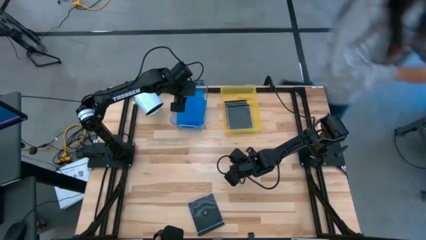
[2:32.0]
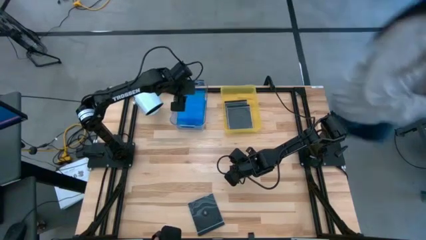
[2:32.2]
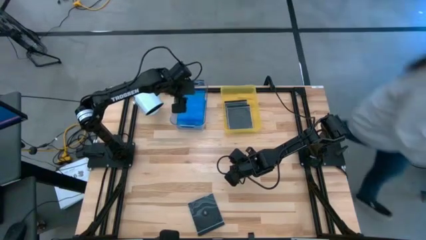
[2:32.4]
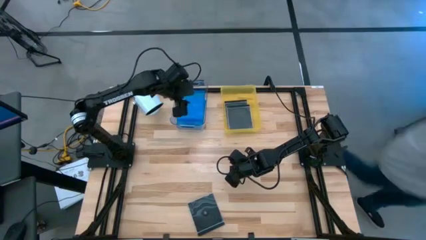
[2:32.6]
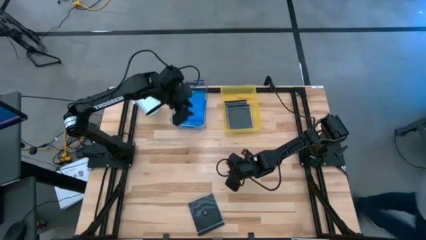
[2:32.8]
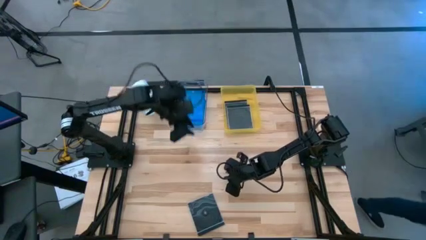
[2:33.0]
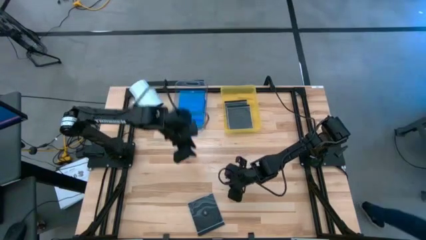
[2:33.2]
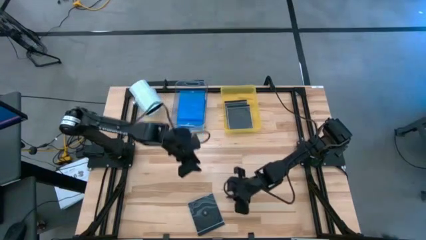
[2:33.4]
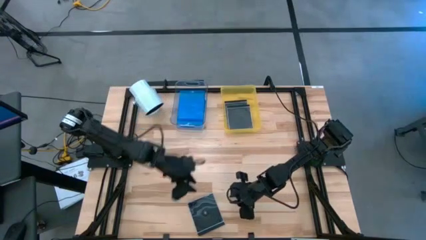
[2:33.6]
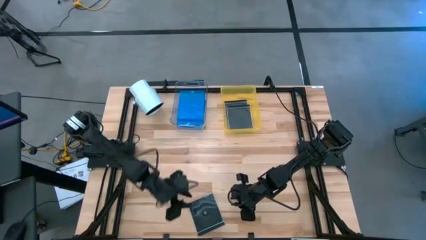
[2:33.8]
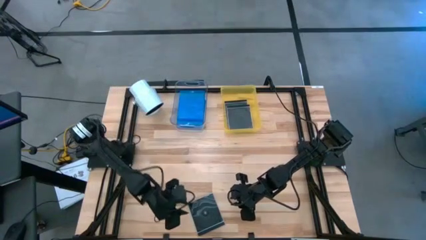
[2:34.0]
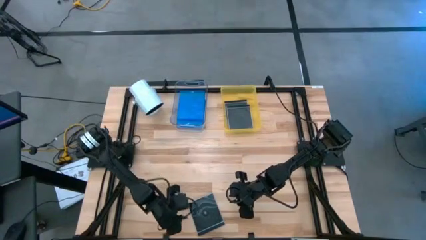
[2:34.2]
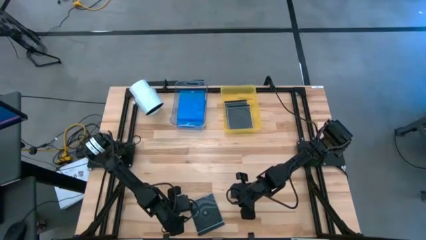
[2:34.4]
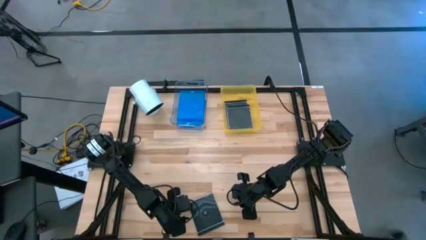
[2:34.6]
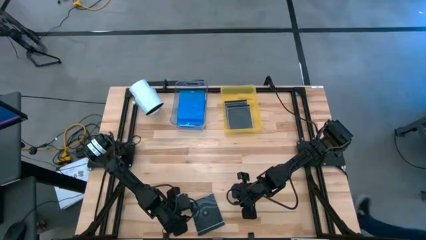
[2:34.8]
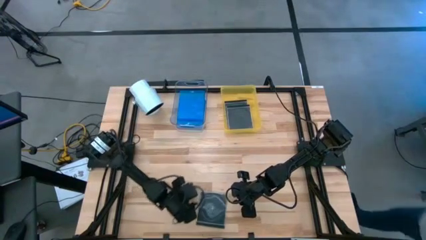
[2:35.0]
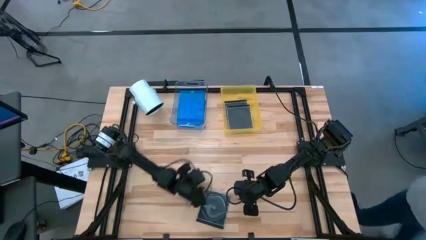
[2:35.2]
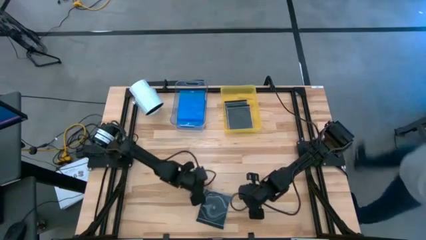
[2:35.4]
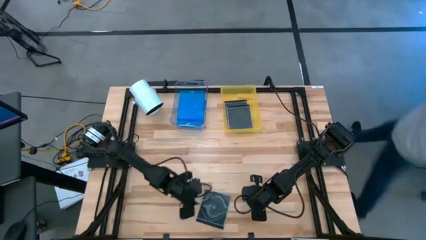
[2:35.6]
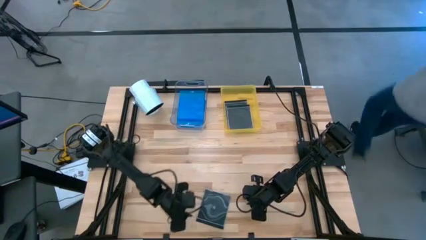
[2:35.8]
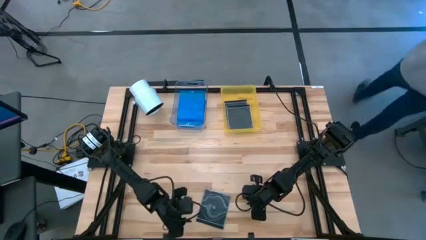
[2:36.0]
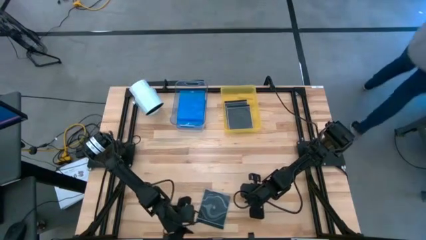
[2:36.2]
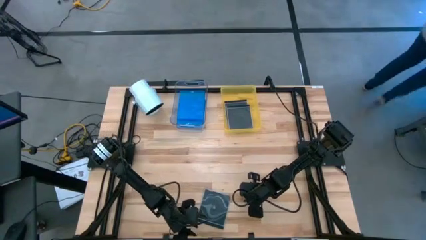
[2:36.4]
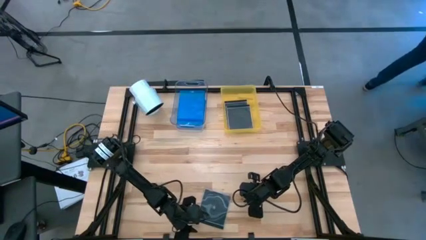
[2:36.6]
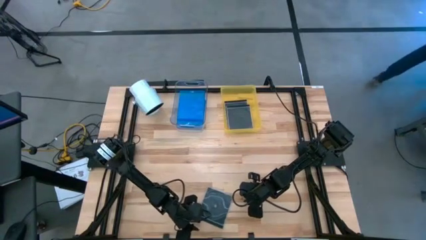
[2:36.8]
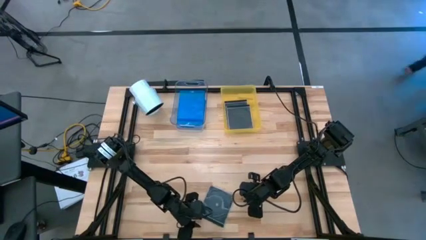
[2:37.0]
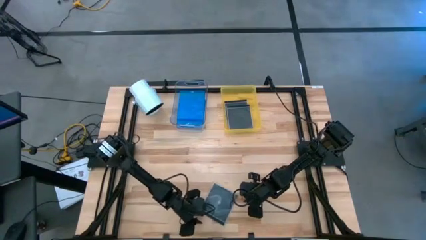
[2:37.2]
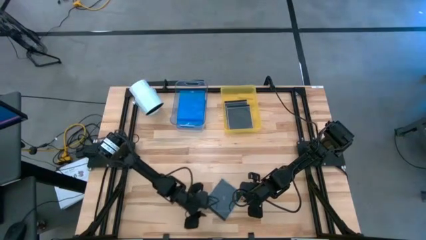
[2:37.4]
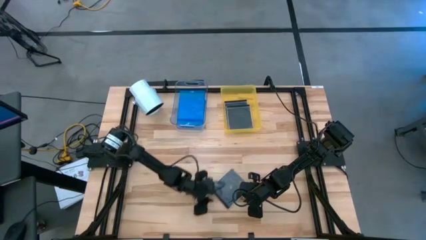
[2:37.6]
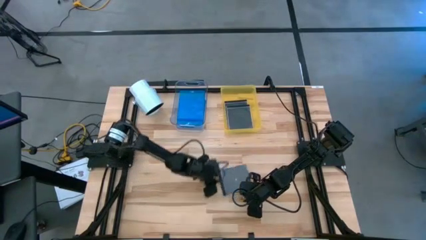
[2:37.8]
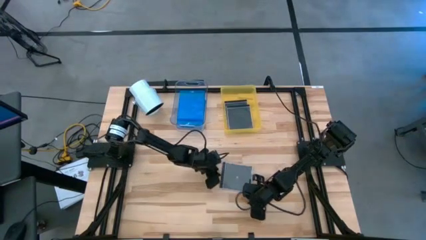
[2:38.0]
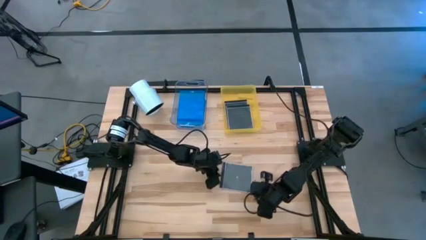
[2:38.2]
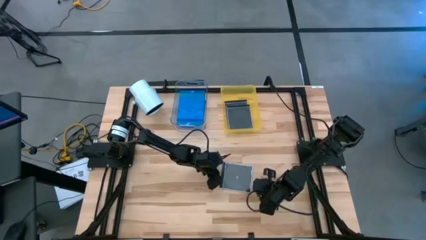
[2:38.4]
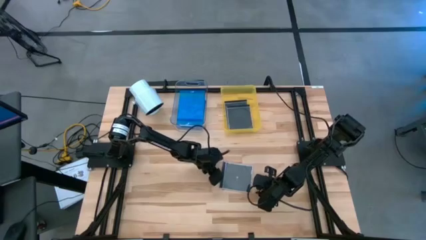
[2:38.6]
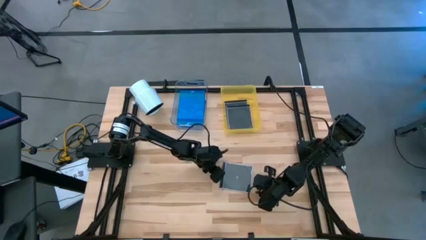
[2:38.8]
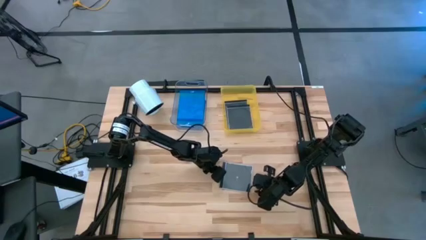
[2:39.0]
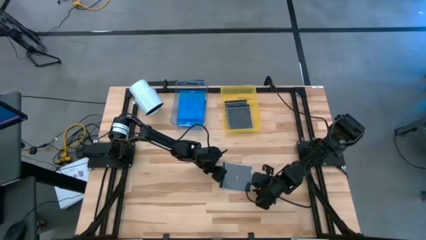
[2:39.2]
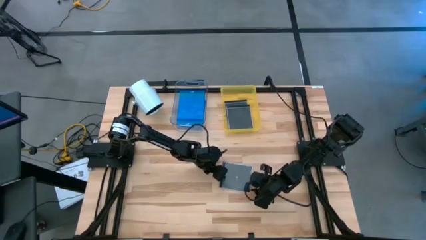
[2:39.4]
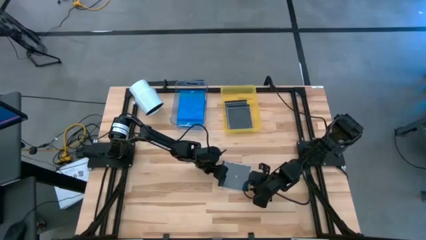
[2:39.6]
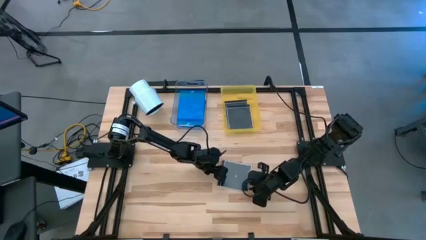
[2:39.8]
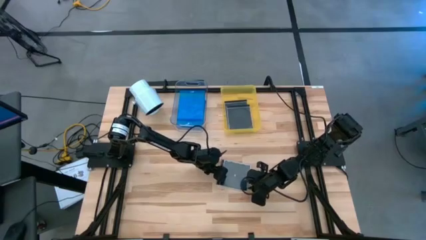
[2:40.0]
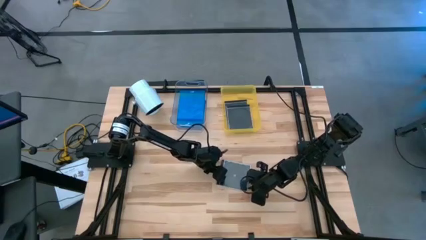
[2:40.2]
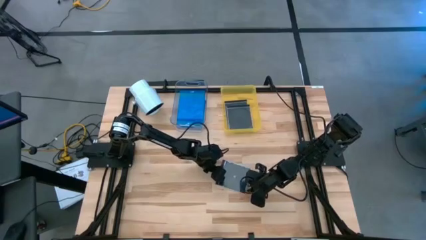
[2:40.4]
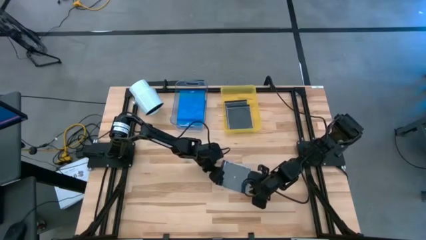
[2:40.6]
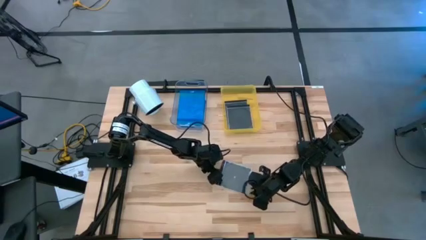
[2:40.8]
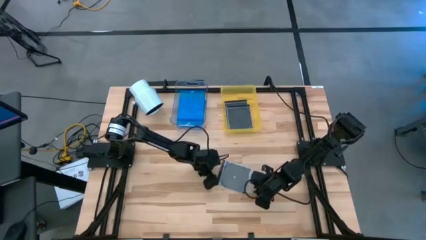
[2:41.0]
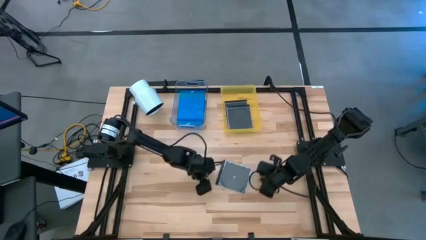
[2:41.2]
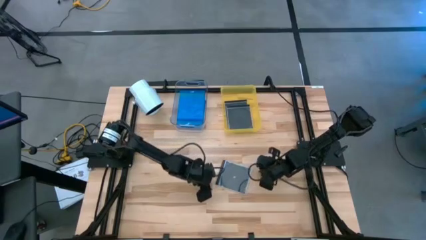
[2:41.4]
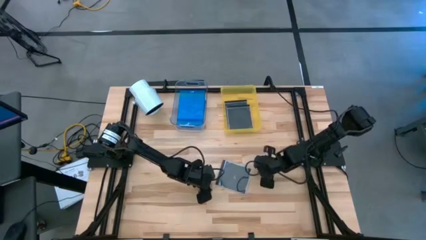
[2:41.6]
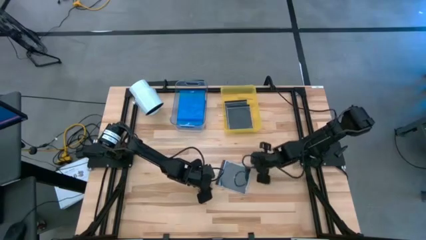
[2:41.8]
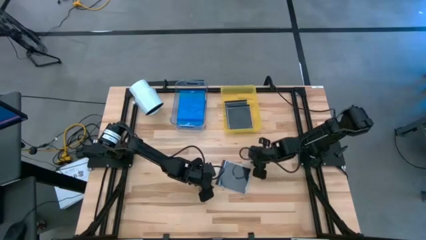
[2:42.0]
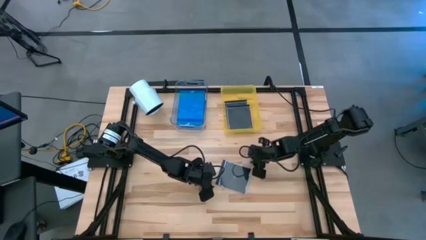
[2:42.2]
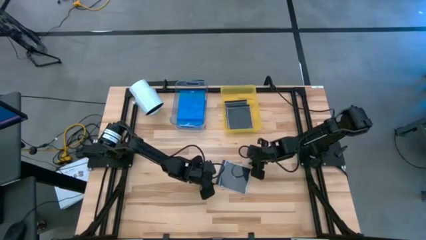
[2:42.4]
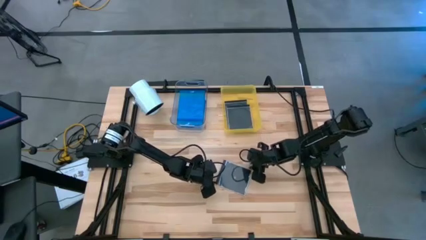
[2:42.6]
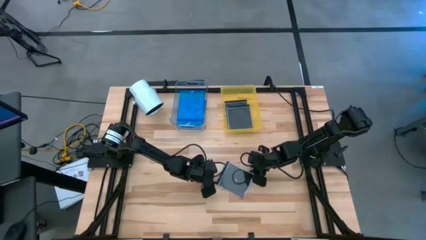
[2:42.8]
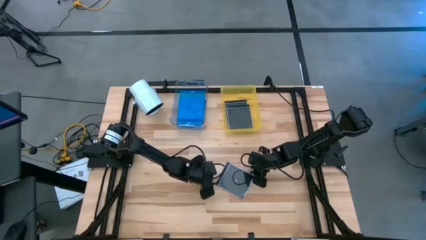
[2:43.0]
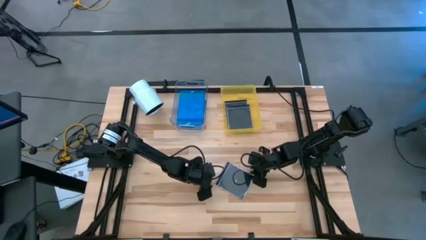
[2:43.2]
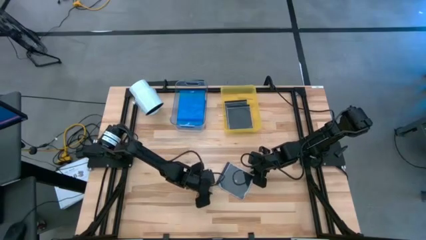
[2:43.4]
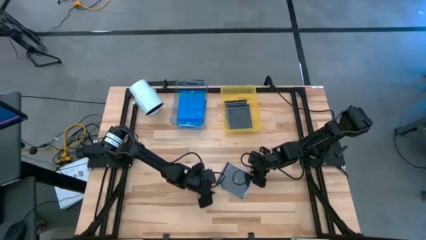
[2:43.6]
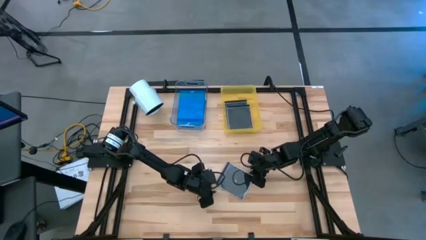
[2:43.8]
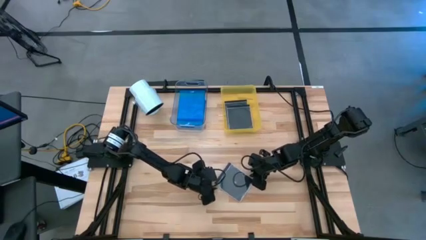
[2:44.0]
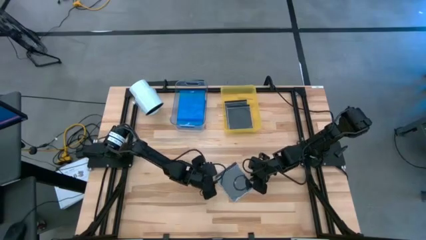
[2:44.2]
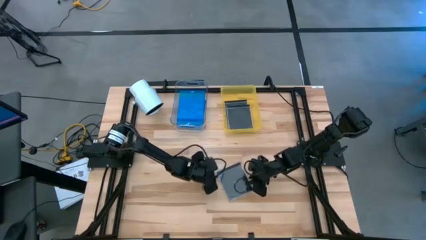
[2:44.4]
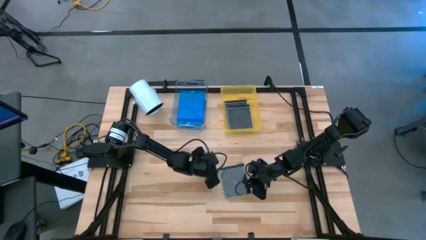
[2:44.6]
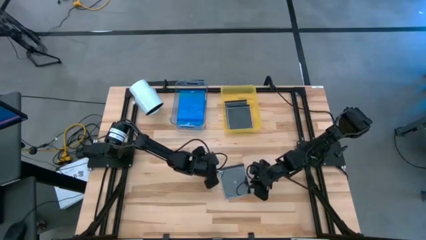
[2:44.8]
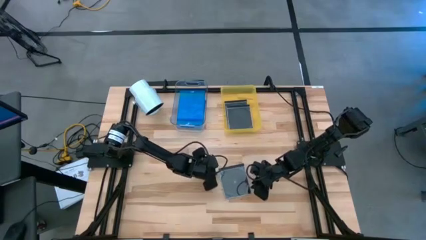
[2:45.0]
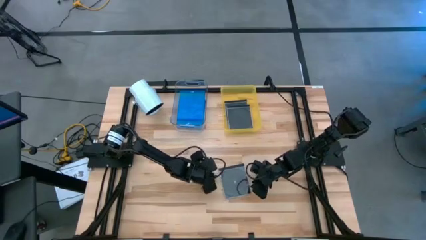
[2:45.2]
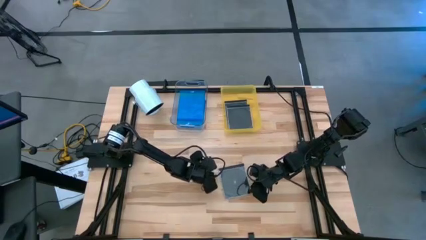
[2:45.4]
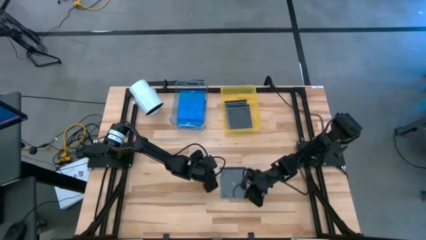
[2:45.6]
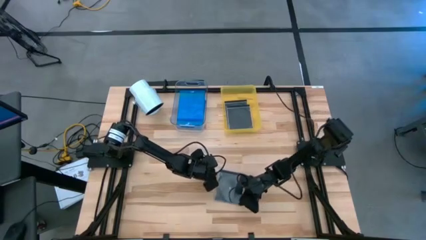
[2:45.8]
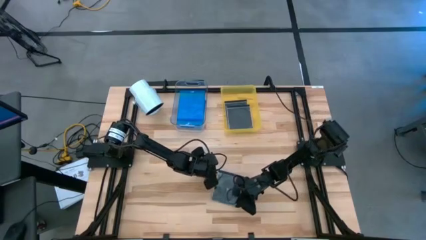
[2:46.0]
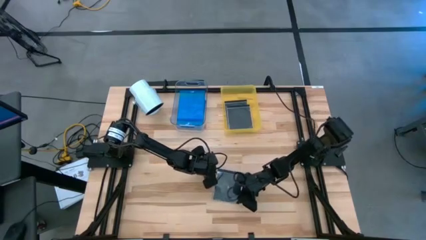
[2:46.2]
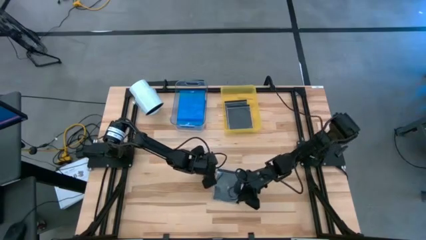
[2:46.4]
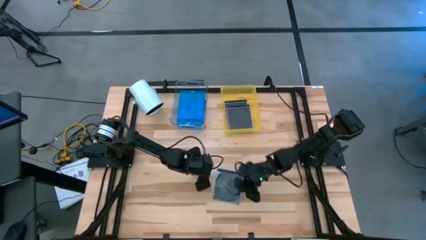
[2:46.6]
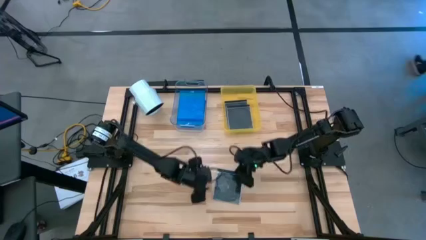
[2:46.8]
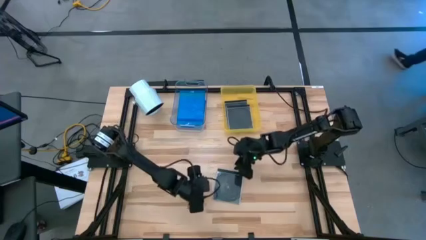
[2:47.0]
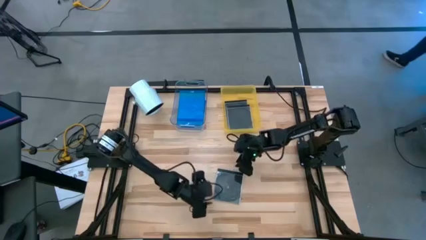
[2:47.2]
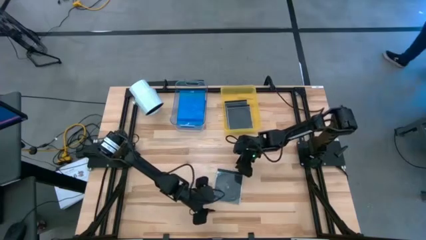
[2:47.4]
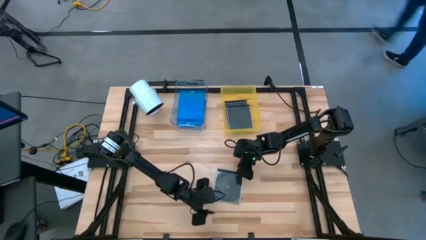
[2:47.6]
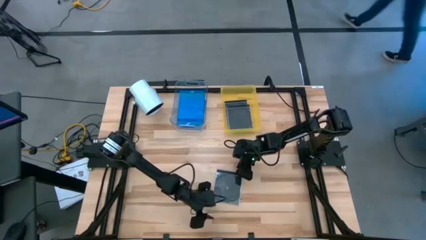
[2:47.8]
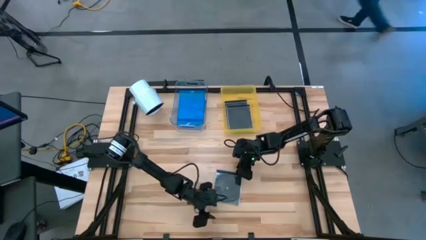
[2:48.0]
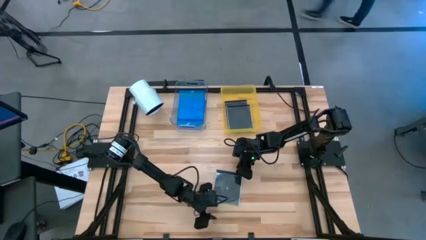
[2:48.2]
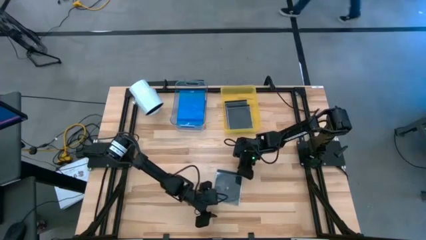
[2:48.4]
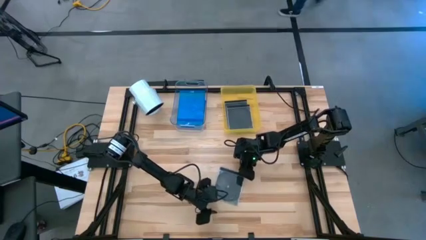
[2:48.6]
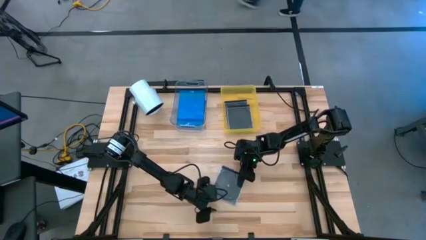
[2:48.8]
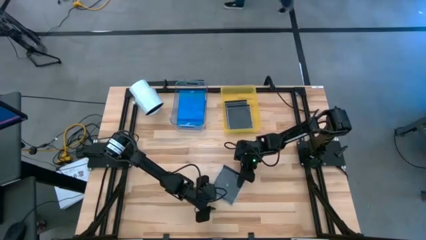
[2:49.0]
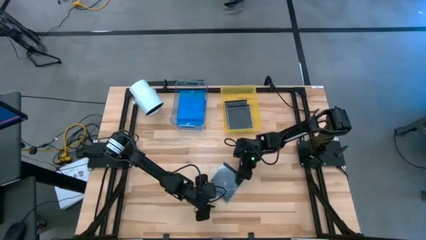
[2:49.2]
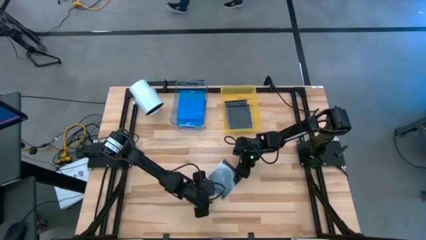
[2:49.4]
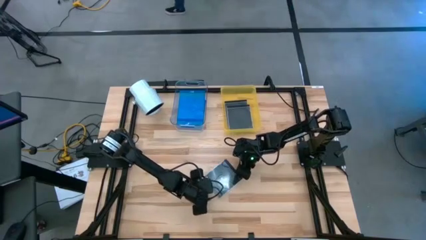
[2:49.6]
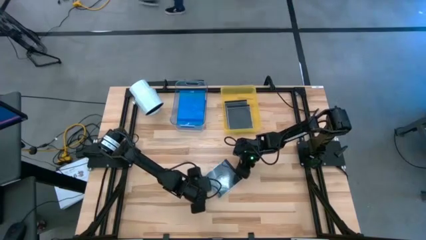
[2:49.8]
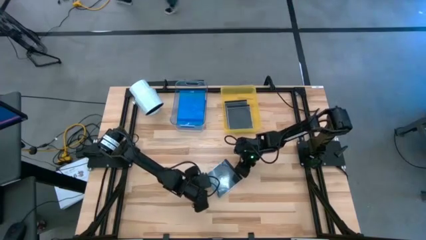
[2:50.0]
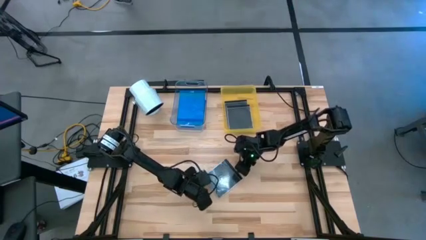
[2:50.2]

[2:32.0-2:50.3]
Task: Pick & place jewel cases by type
Put the black CD case into the yellow bin
